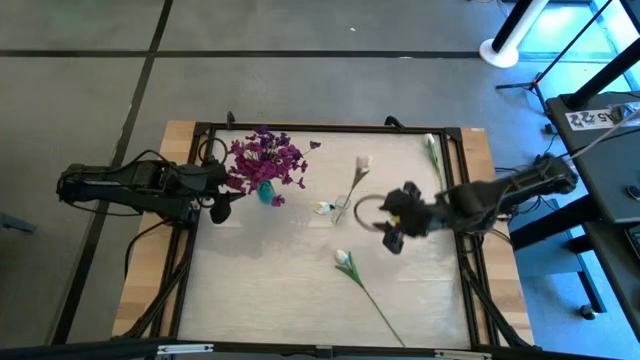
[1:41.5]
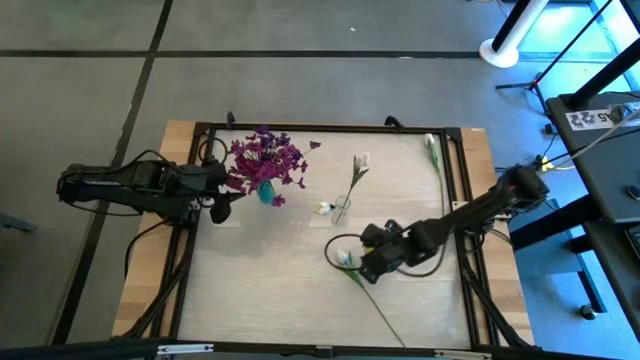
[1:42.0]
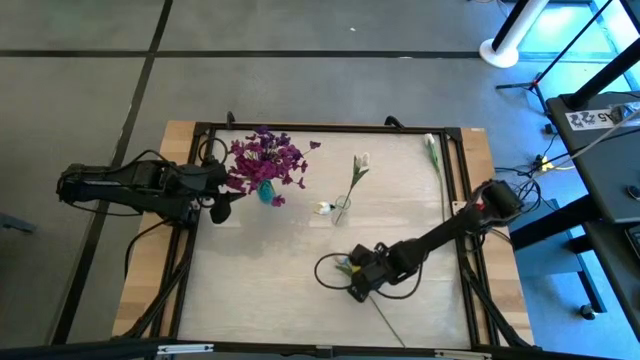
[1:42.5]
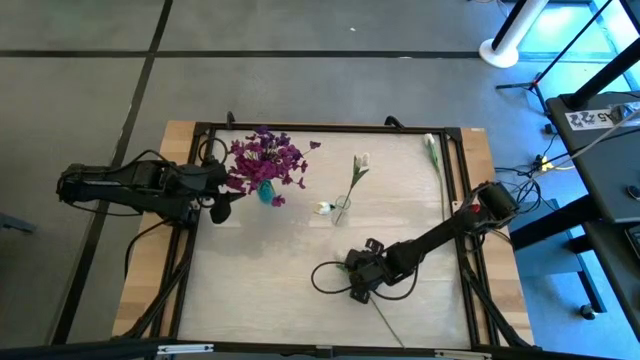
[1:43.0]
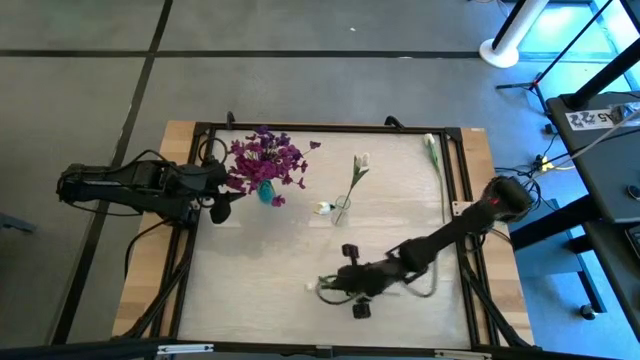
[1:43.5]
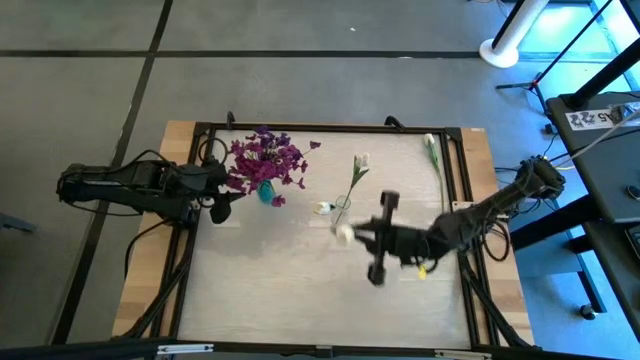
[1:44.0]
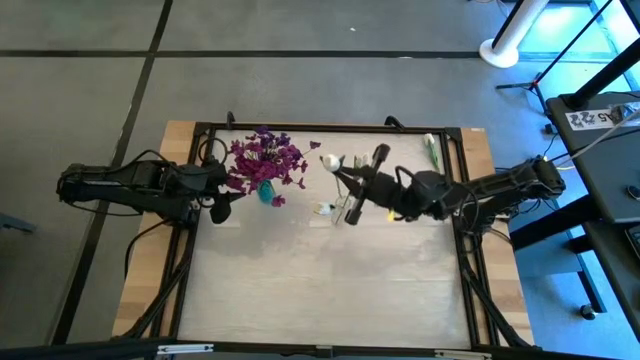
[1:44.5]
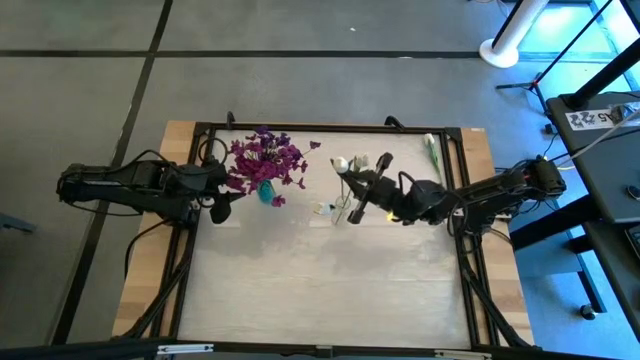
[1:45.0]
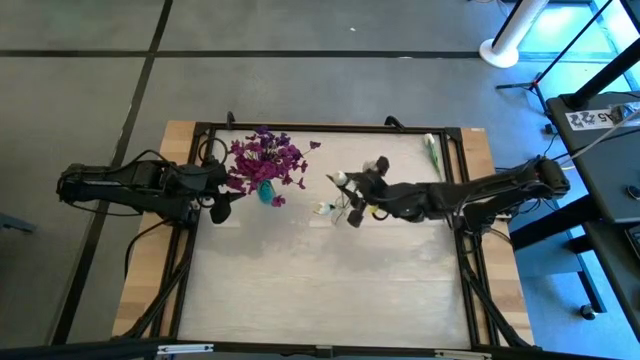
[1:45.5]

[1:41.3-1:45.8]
Task: Sort flowers into vase by color
Put the bottom white tulip into the transparent flower vase

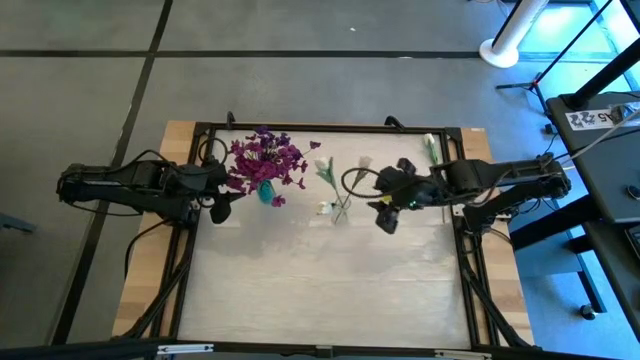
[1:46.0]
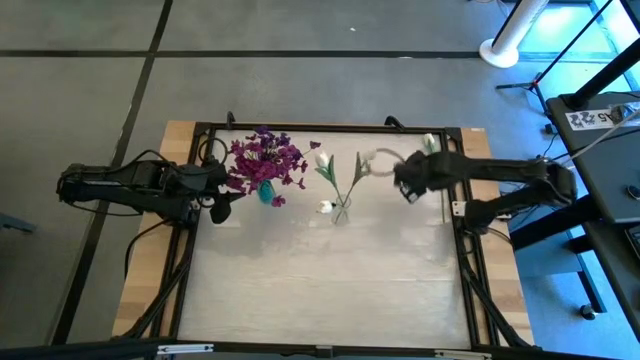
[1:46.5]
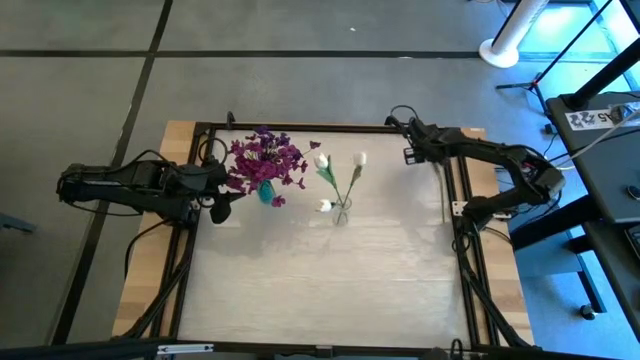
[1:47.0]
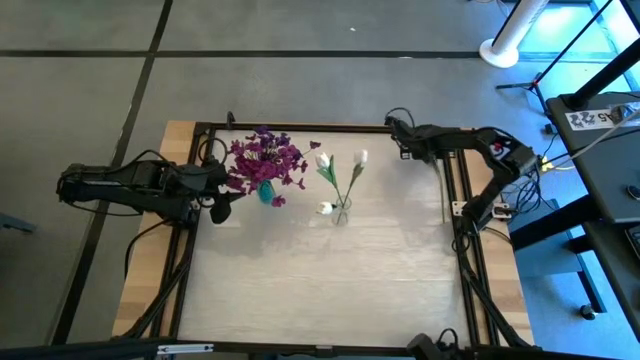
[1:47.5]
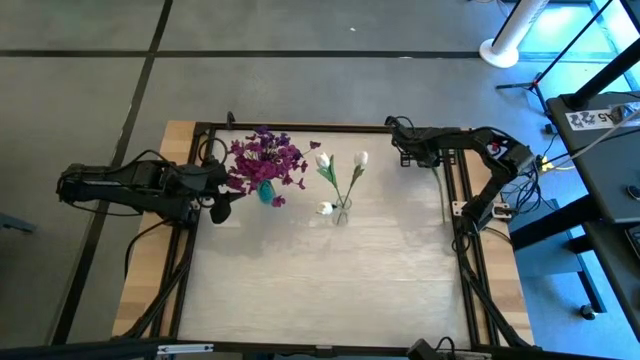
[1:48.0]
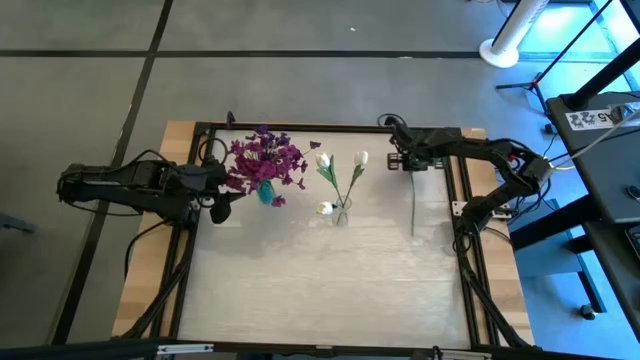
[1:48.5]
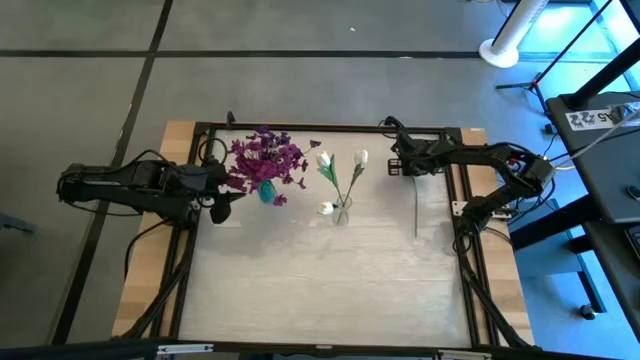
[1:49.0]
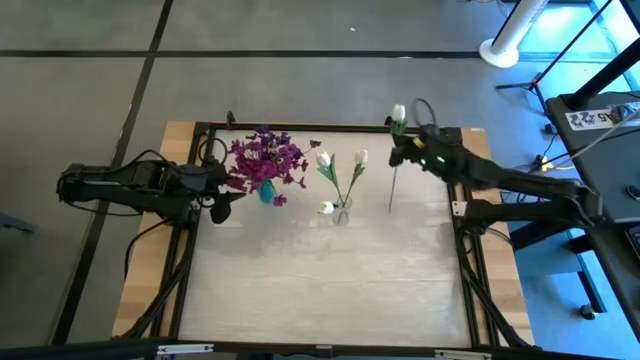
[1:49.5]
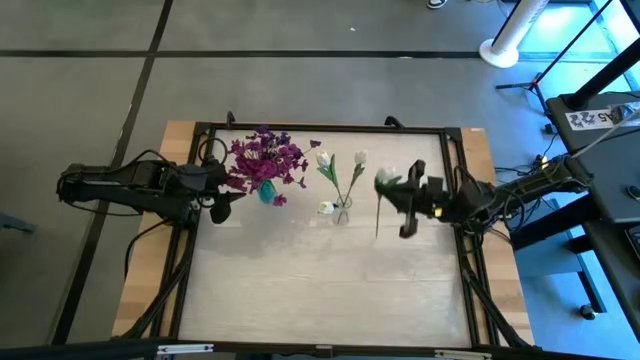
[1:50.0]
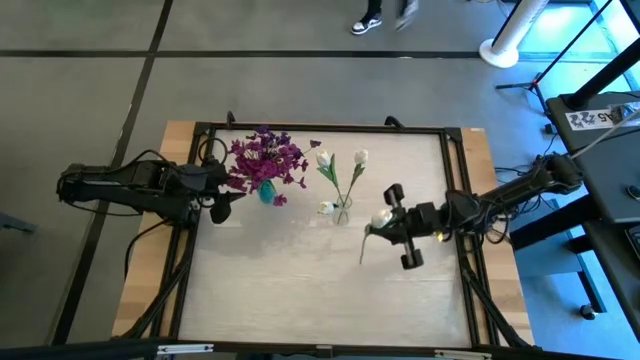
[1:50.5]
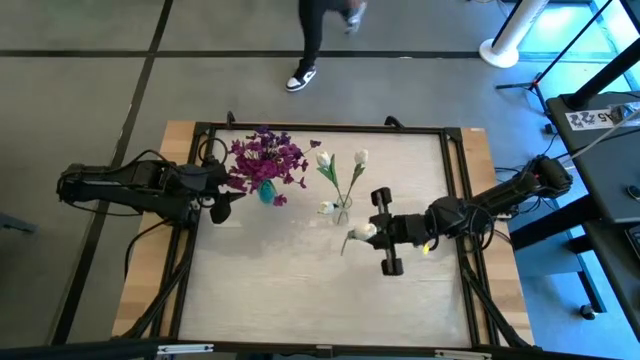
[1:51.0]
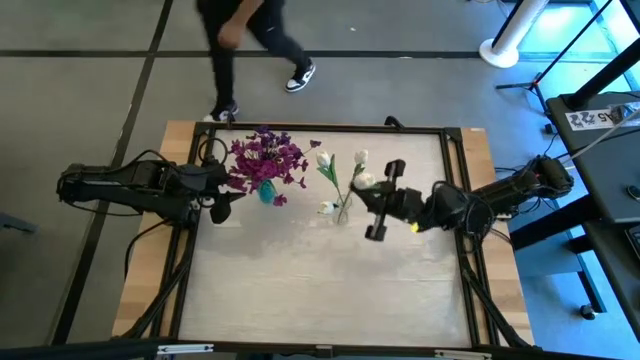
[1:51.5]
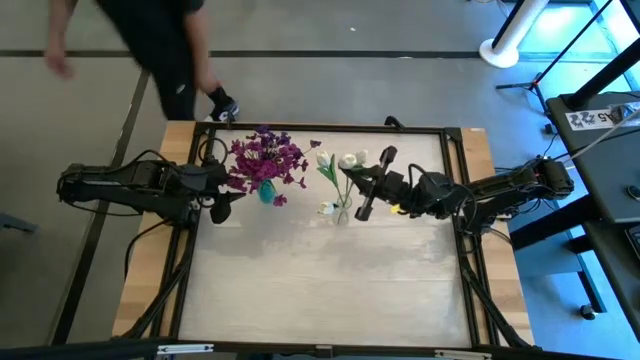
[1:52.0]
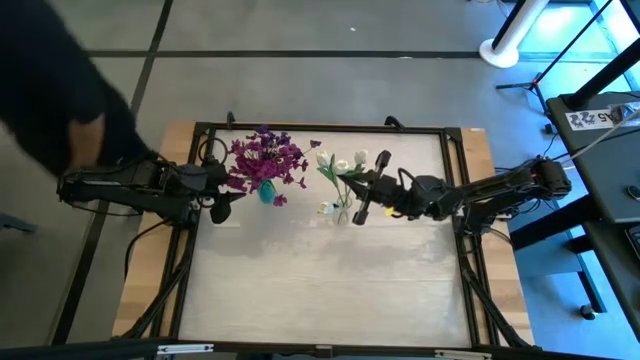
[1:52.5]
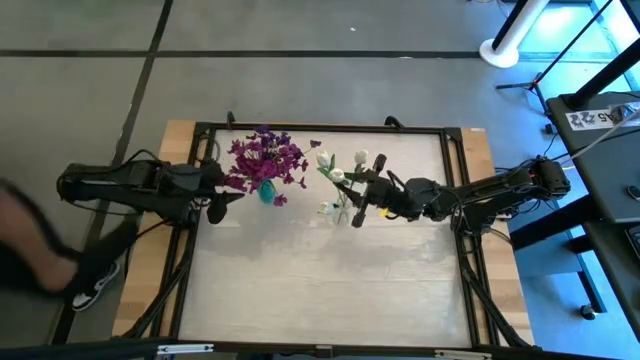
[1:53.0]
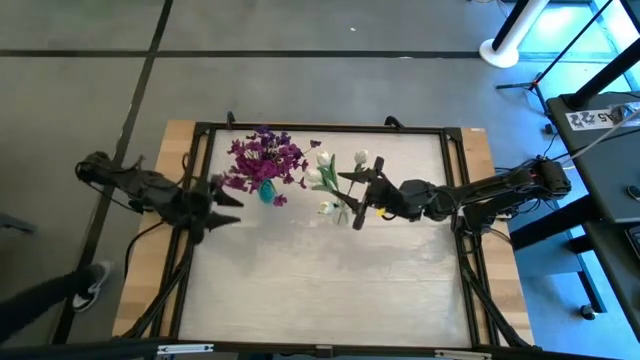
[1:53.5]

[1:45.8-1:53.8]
Put the white tulip into the transparent flower vase

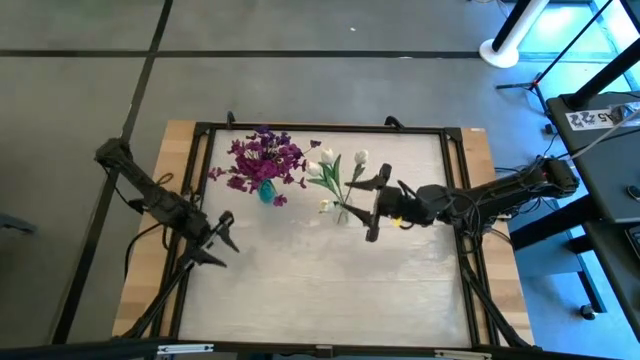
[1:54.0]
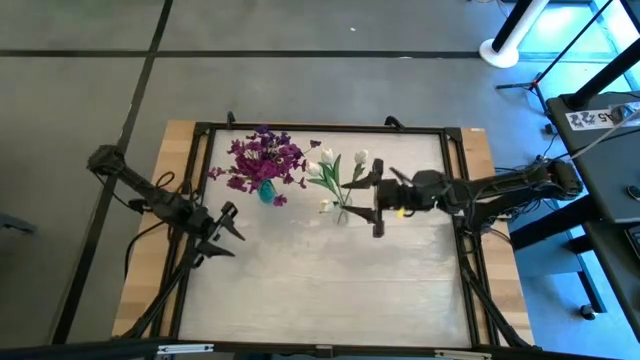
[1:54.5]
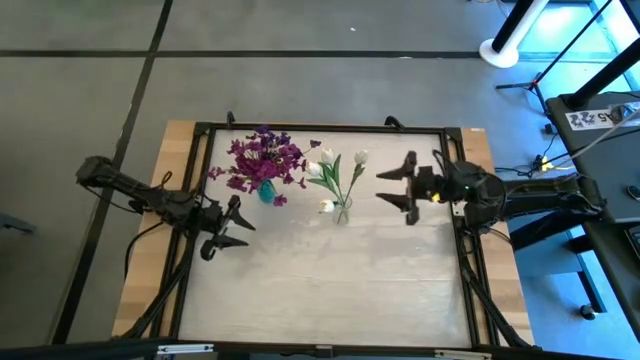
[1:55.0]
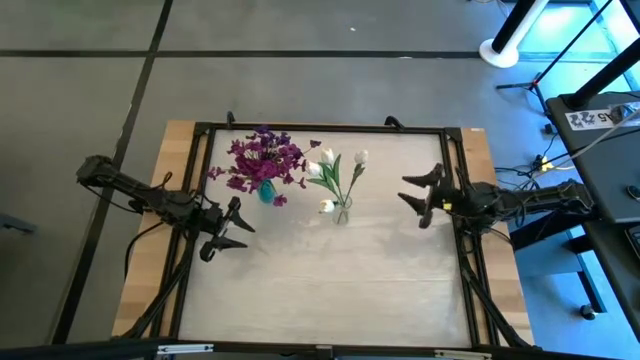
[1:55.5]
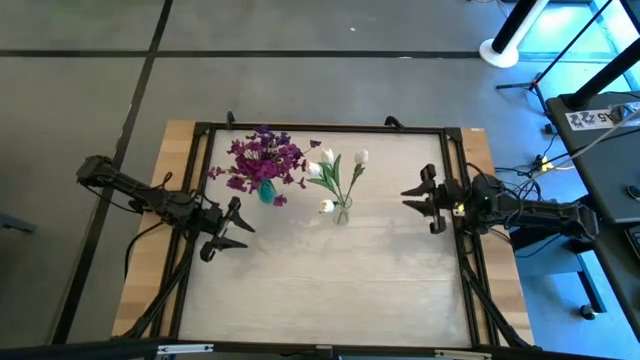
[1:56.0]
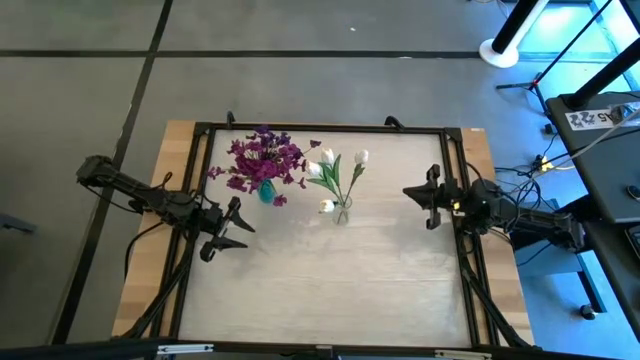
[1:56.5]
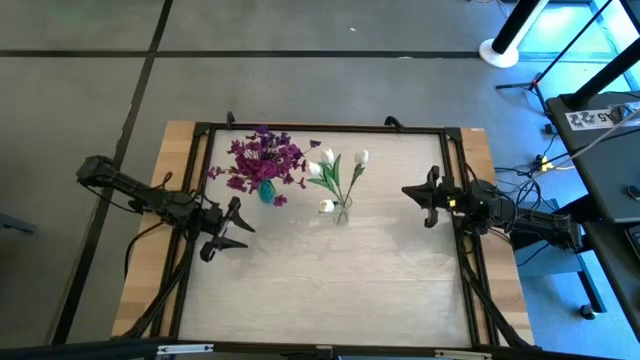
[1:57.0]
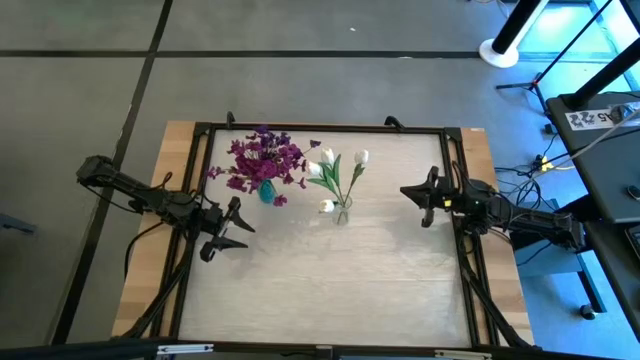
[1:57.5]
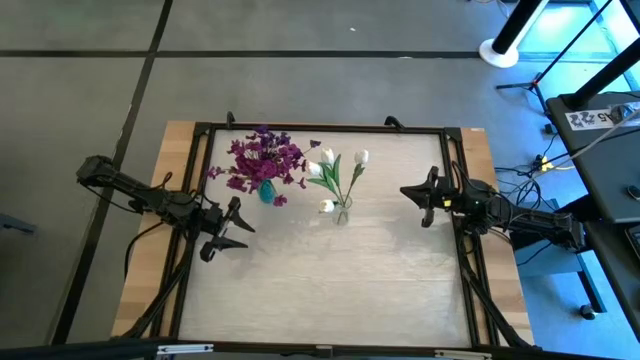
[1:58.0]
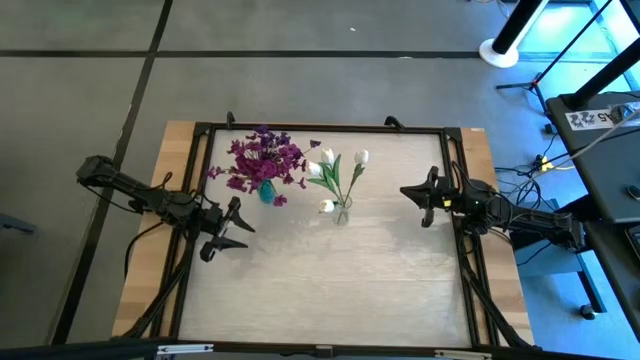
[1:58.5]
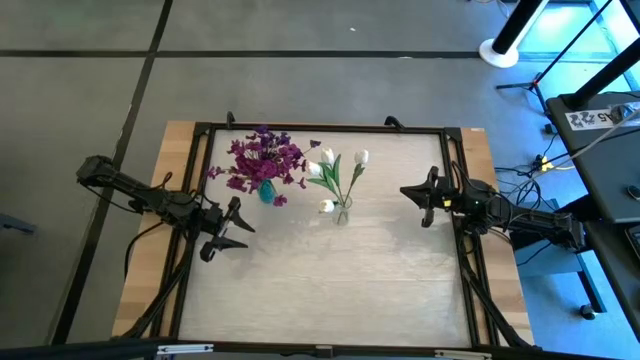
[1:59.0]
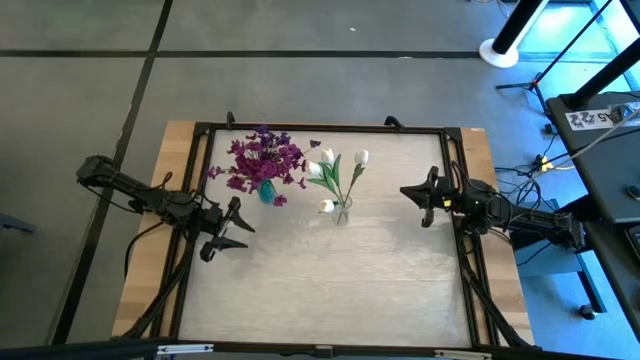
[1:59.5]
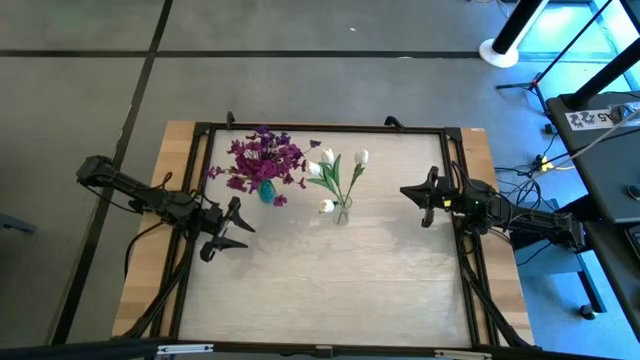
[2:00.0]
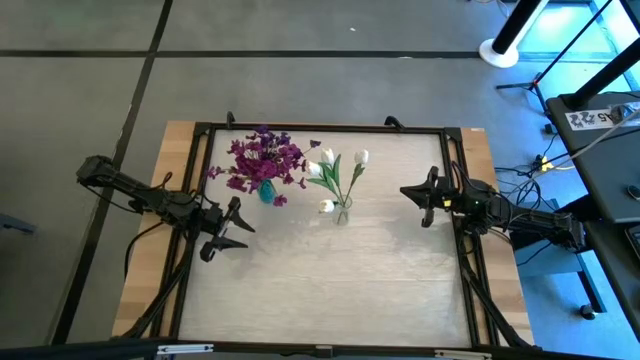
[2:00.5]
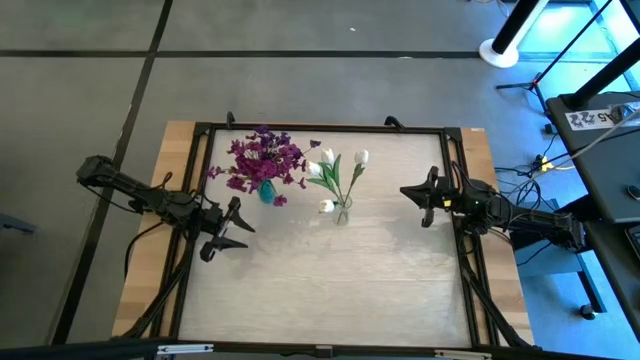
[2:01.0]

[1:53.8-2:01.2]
Return to Home Position
